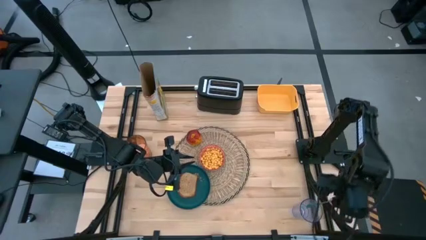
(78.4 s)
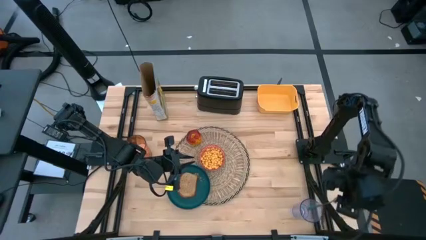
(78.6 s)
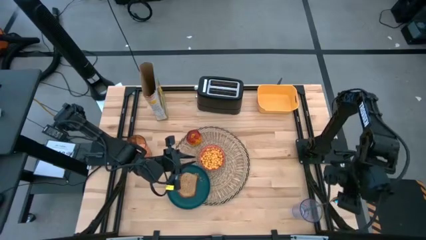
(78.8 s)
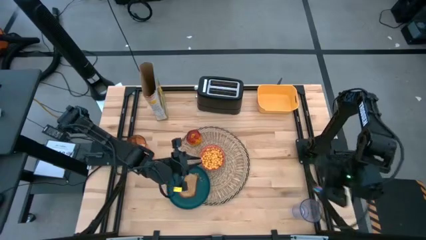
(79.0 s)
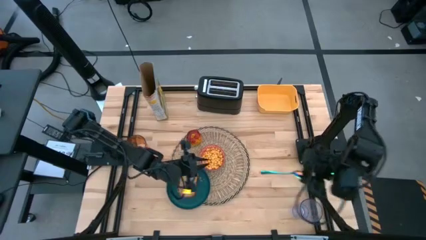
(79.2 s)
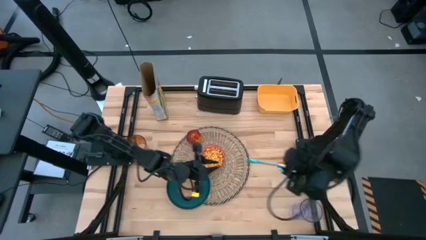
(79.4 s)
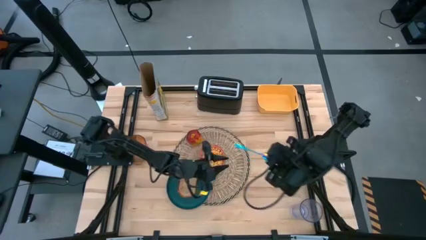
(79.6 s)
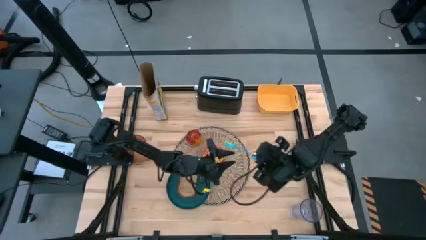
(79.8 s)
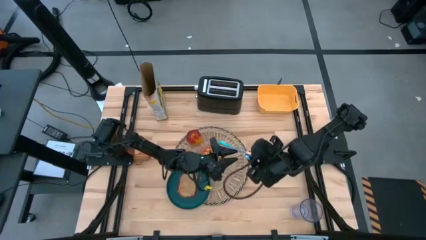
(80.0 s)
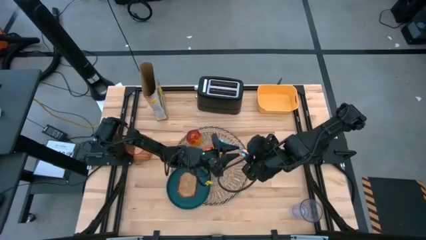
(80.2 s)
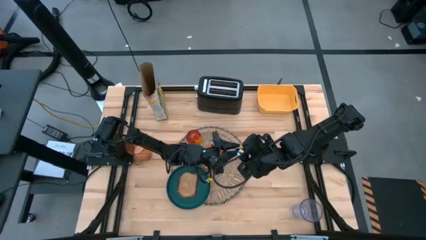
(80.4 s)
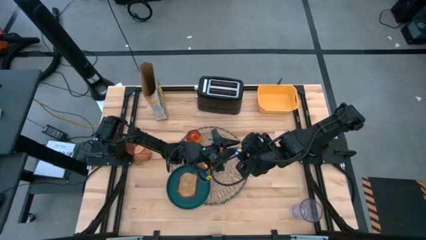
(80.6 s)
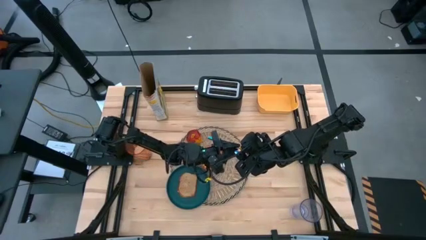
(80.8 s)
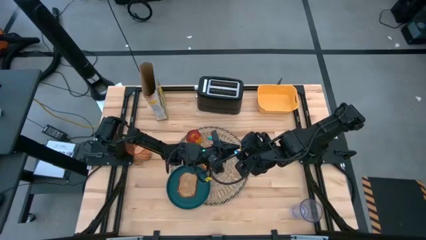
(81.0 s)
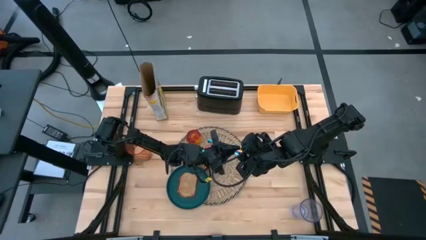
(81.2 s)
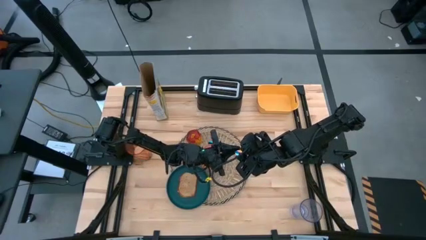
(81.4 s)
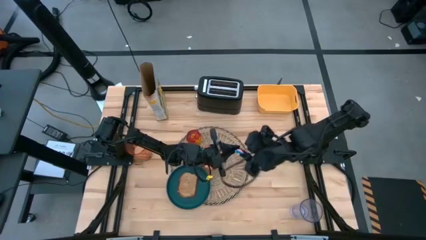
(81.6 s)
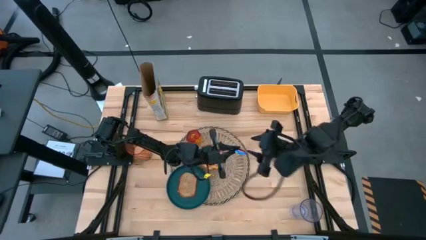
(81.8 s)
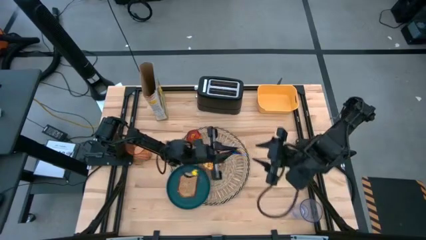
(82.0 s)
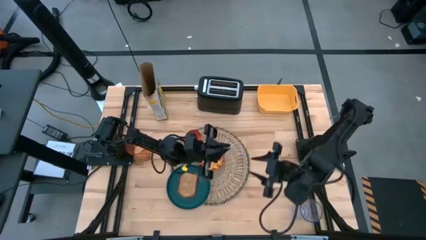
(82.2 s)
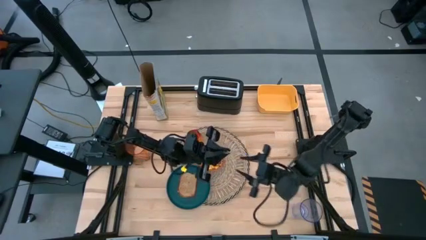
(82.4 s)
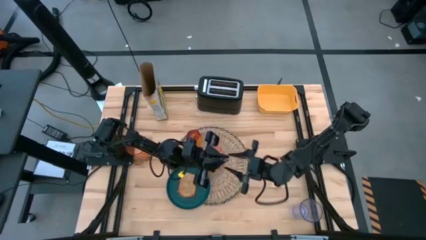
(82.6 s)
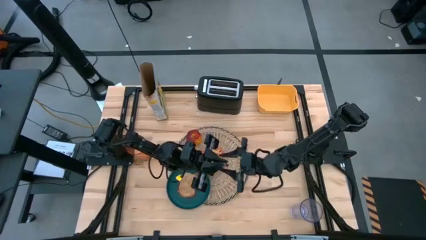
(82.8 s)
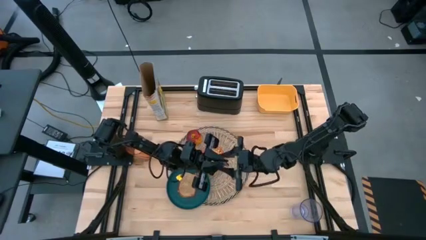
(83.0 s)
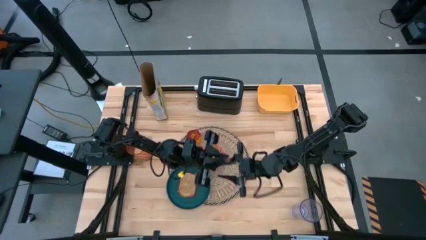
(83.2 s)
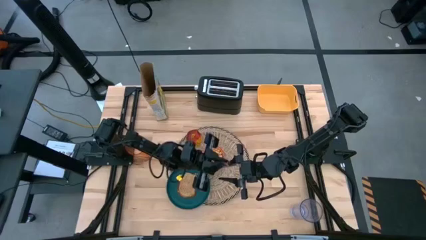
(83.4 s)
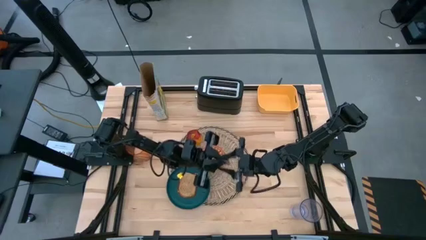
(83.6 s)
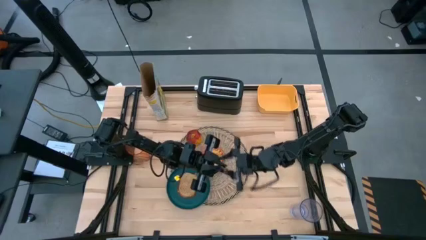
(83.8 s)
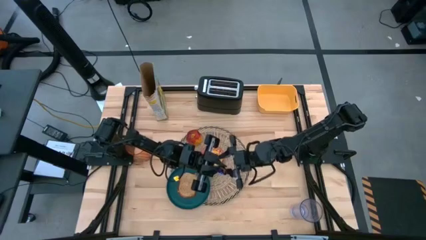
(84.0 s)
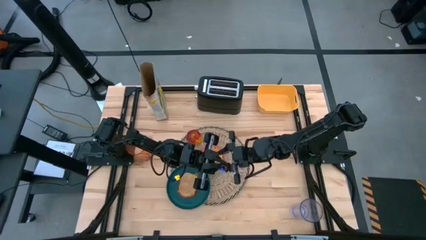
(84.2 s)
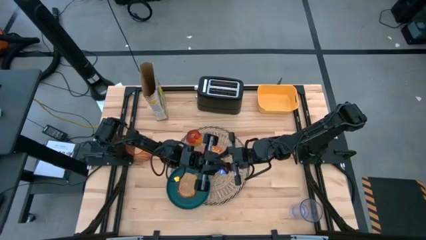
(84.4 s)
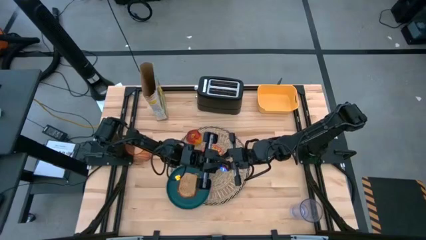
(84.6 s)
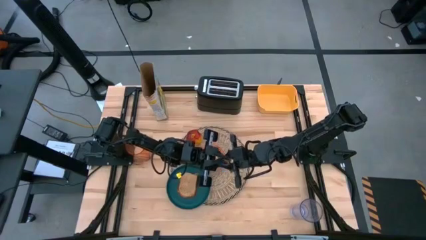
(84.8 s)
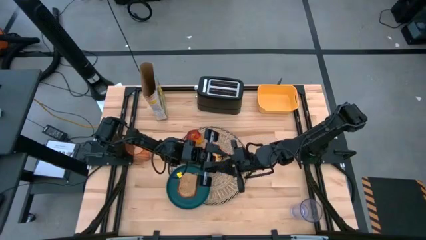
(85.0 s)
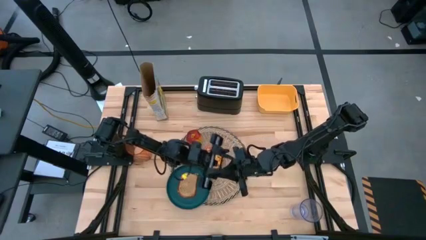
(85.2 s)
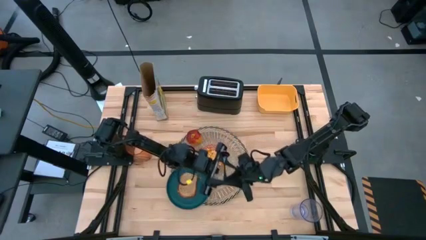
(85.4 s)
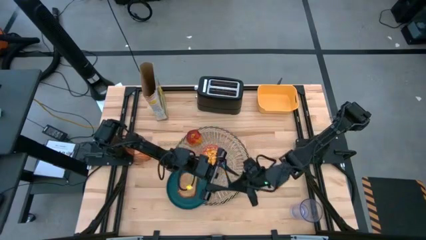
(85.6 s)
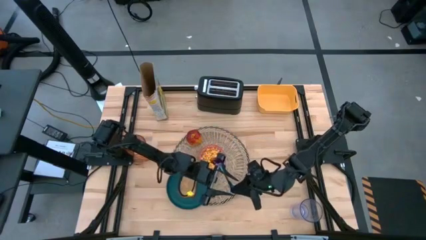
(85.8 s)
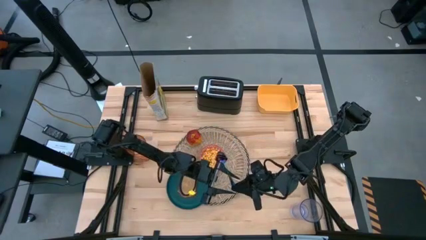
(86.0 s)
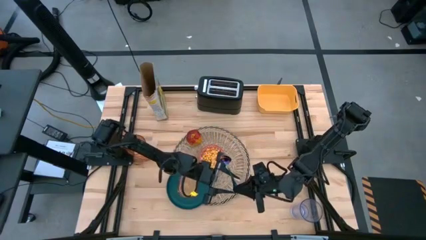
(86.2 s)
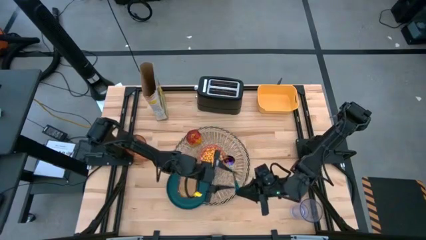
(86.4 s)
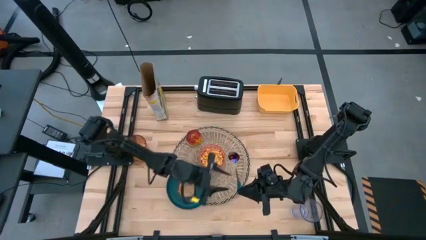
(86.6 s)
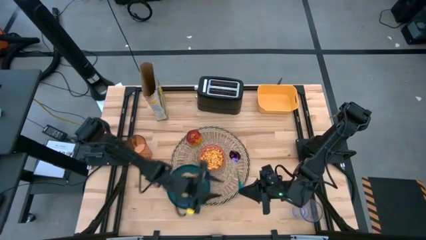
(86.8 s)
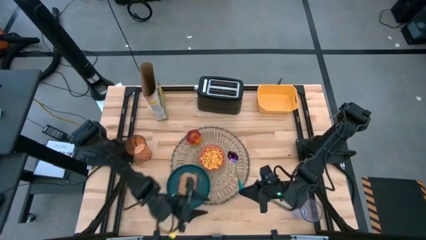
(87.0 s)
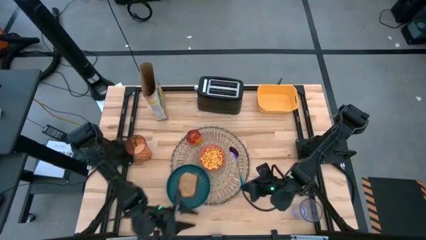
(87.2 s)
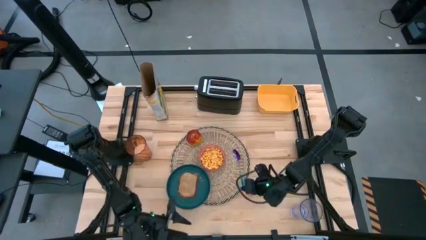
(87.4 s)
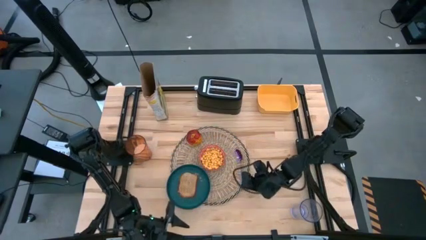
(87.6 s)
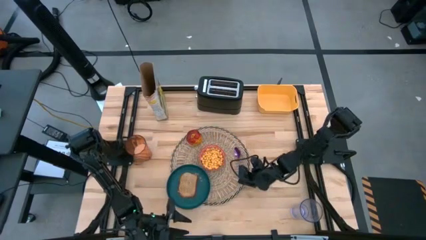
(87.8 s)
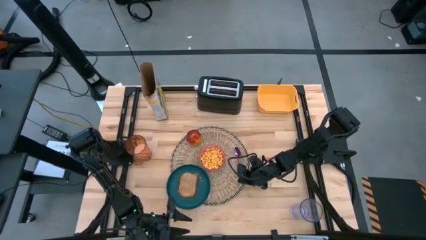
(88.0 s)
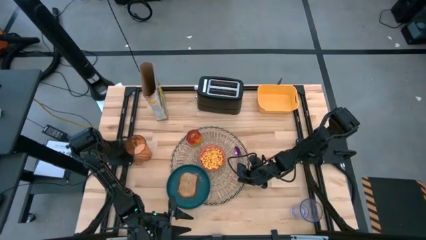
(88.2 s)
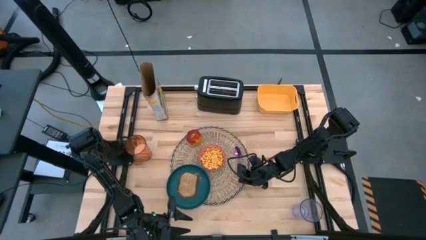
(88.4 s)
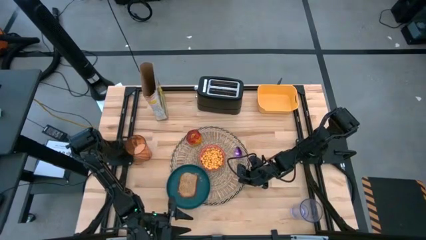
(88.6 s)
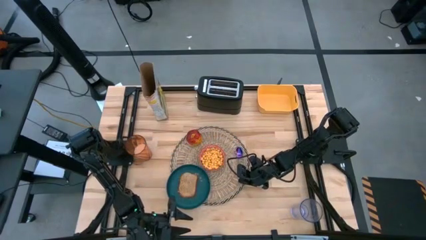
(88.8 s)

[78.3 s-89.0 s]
Task: Arrange a breakfast setting
Put the purple spoon on the brown placemat to the right of the red patterned bowl

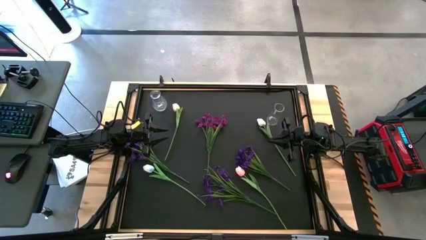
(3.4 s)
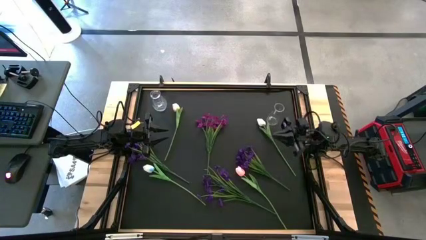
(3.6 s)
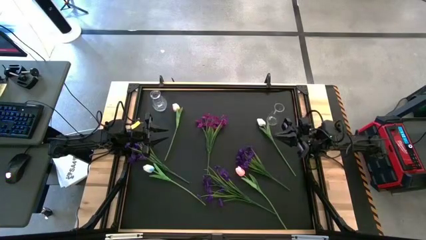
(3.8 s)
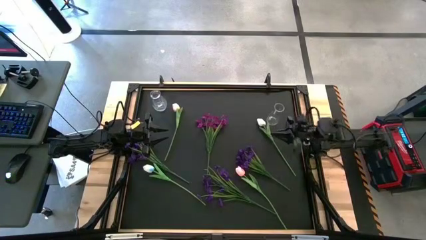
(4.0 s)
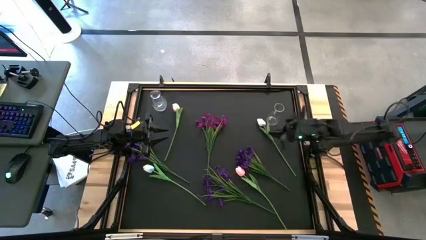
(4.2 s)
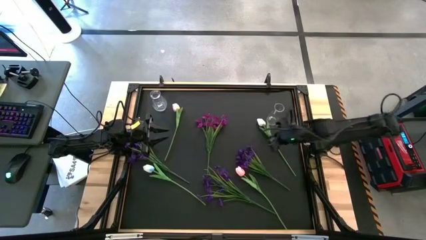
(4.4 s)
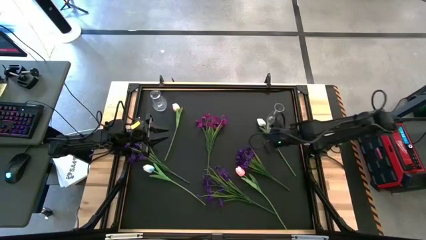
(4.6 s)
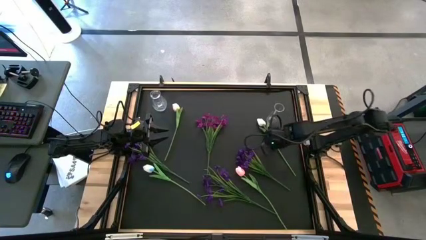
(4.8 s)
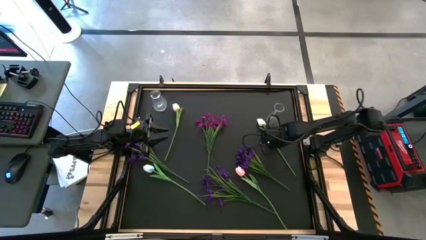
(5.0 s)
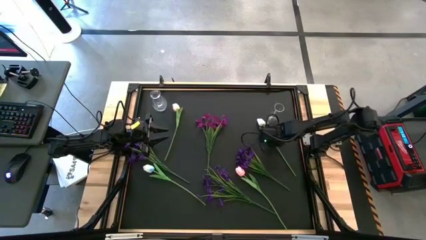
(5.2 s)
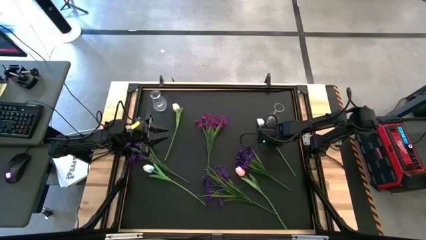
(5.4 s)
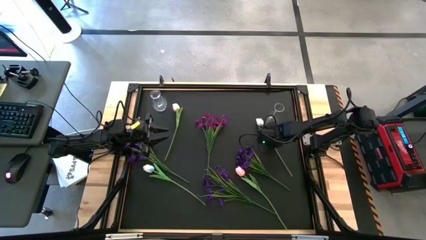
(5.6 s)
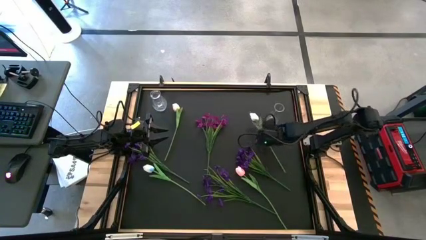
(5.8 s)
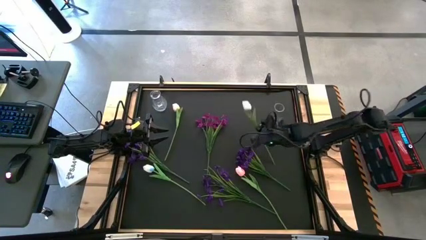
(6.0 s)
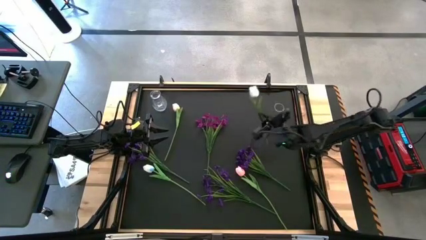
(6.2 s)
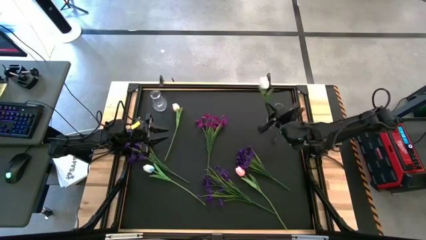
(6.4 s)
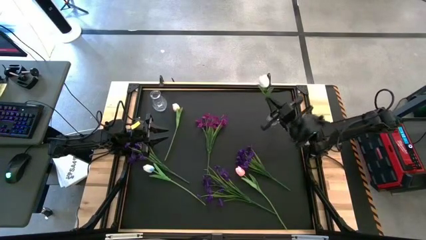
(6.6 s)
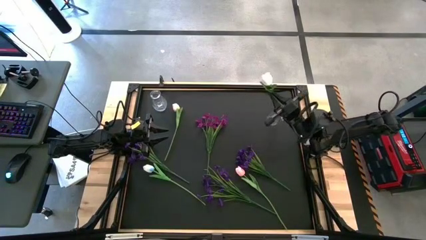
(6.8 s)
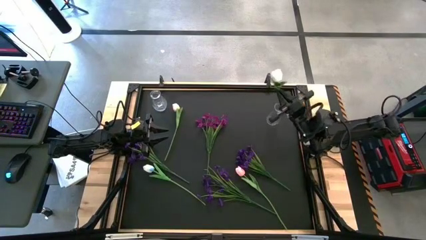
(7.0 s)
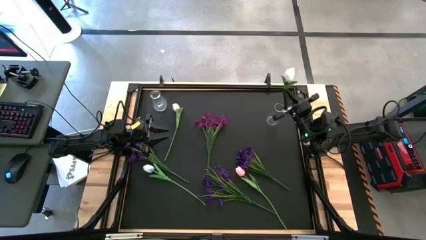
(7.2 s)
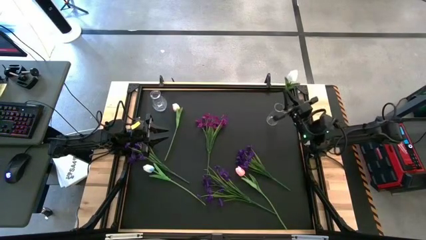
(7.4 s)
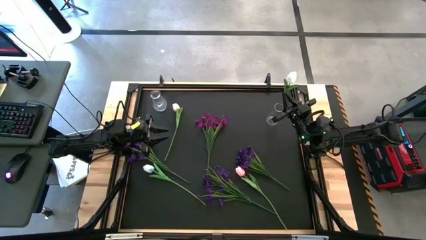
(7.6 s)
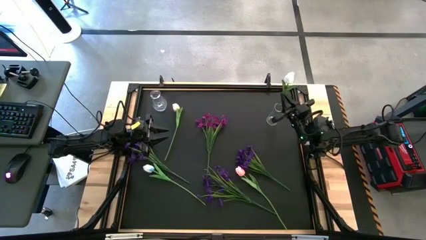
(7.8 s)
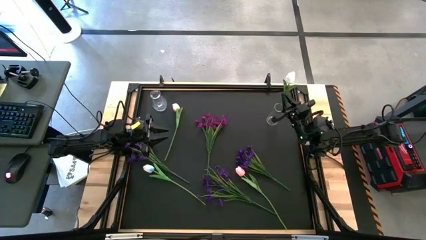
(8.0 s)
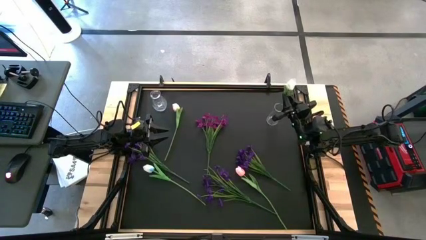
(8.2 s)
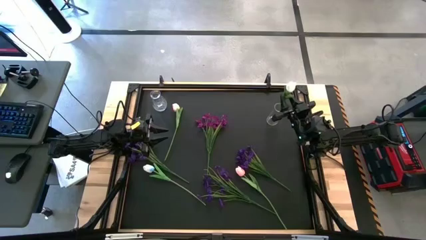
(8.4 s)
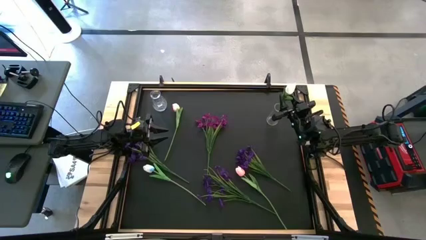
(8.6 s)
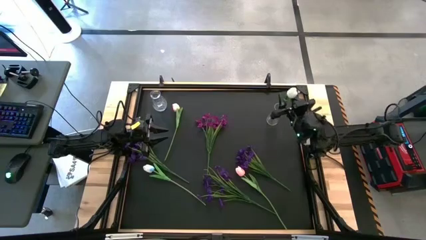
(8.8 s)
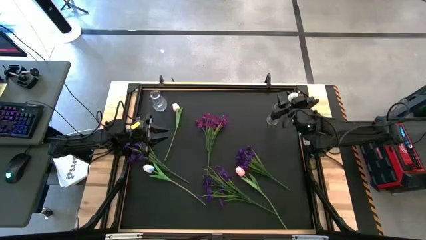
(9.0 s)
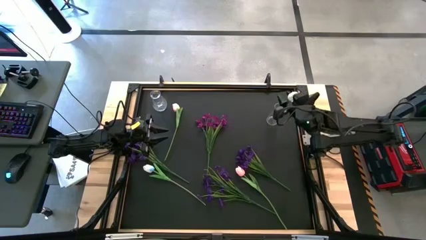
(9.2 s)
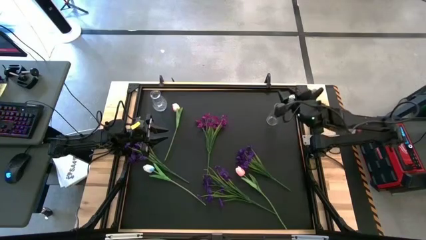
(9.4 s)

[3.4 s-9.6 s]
Task: Sort flowers into vase by color
Put the top right white tulip into the right transparent vase
